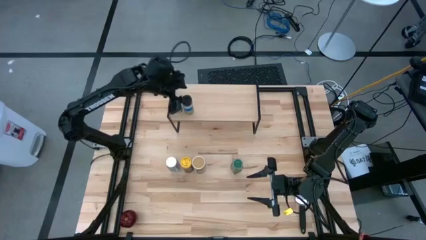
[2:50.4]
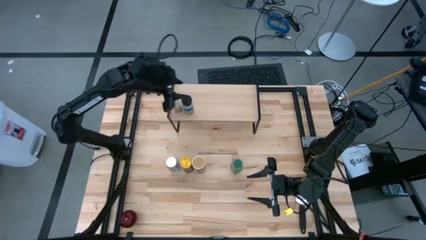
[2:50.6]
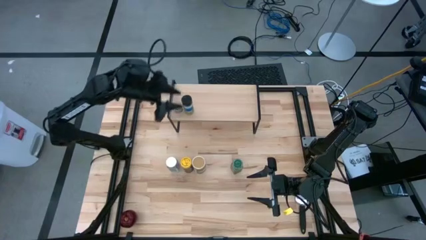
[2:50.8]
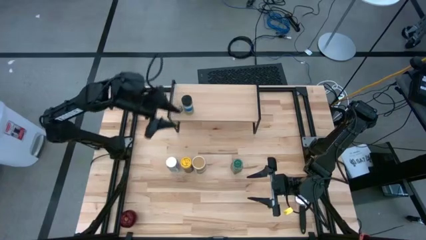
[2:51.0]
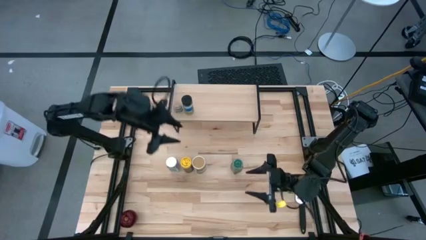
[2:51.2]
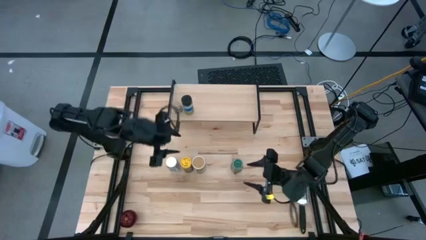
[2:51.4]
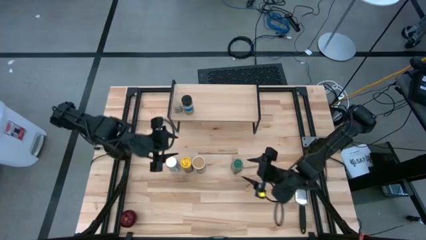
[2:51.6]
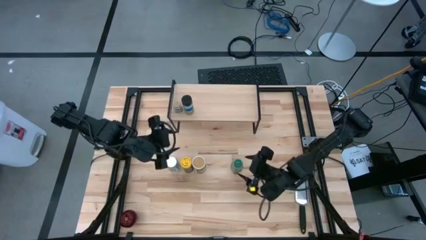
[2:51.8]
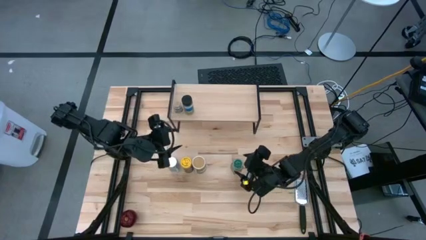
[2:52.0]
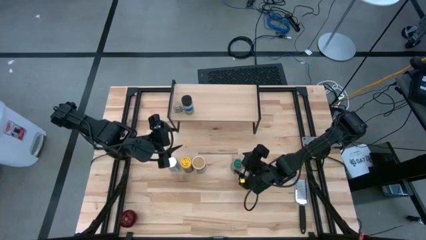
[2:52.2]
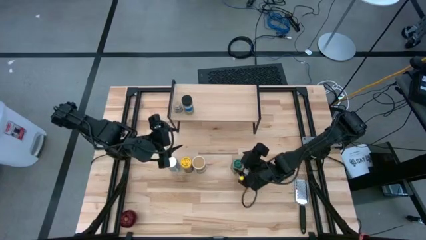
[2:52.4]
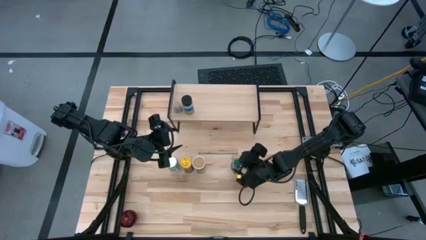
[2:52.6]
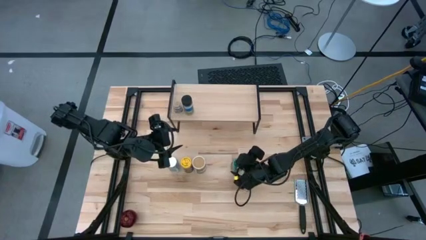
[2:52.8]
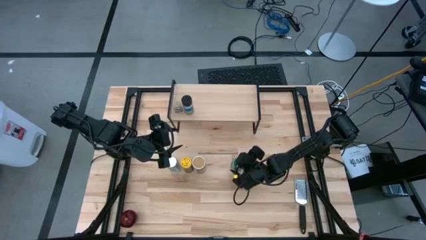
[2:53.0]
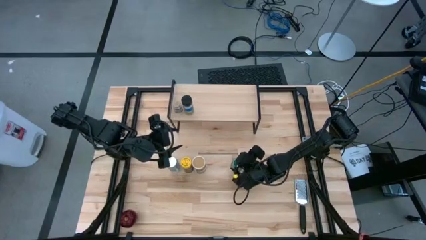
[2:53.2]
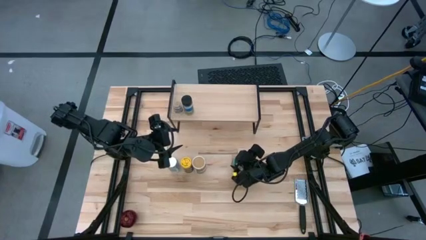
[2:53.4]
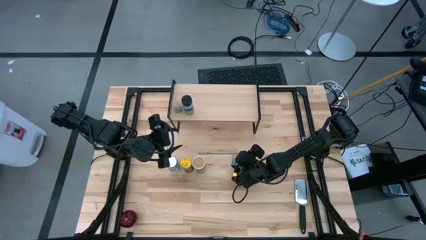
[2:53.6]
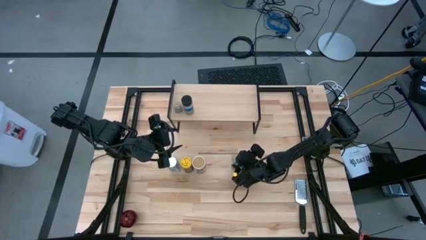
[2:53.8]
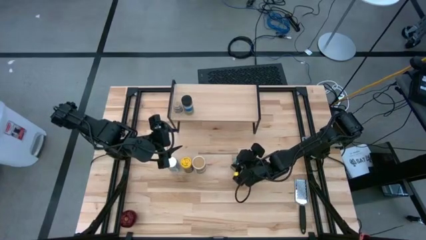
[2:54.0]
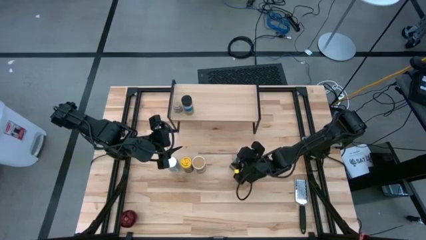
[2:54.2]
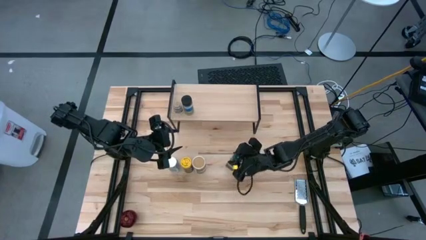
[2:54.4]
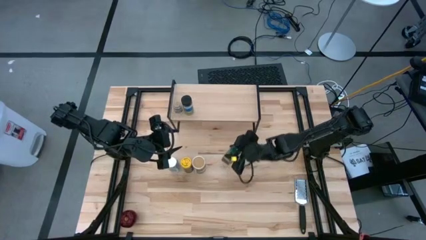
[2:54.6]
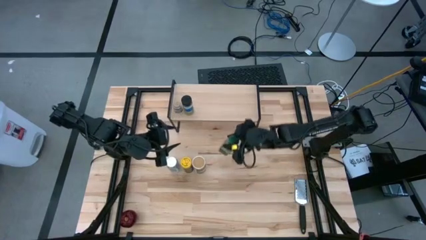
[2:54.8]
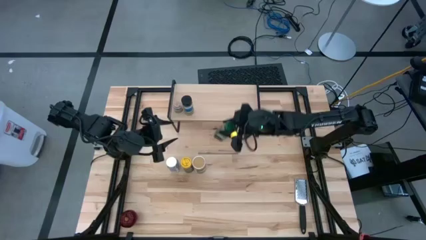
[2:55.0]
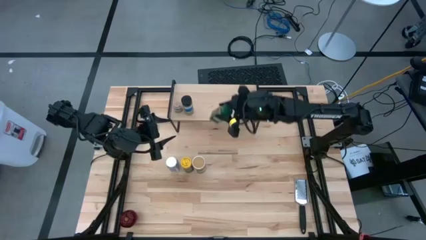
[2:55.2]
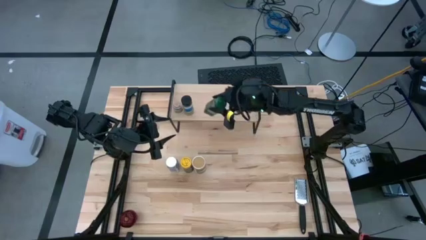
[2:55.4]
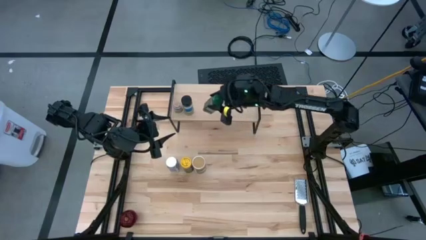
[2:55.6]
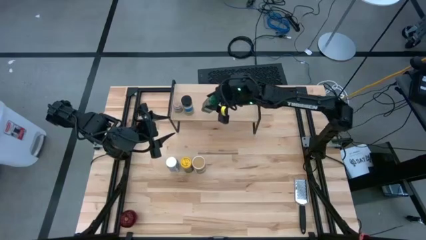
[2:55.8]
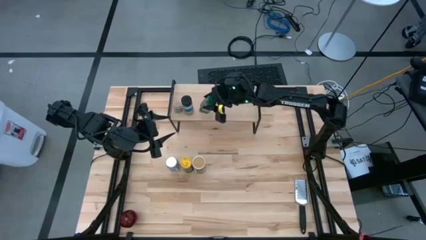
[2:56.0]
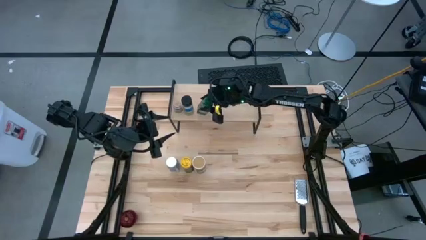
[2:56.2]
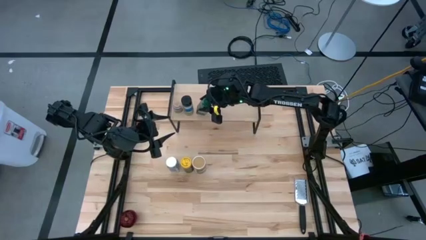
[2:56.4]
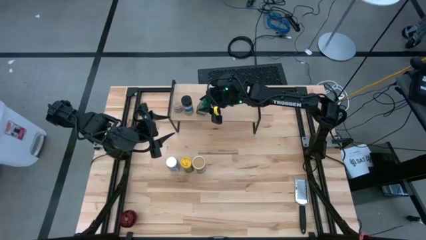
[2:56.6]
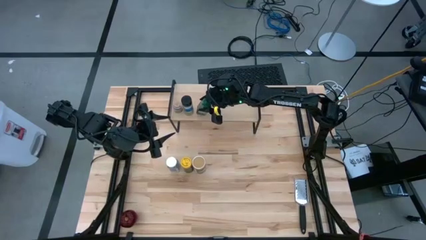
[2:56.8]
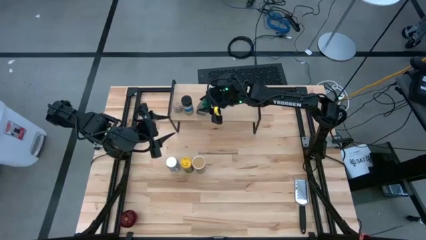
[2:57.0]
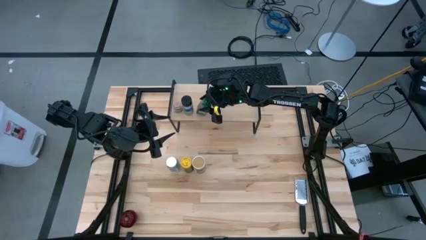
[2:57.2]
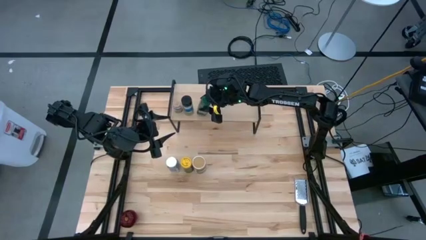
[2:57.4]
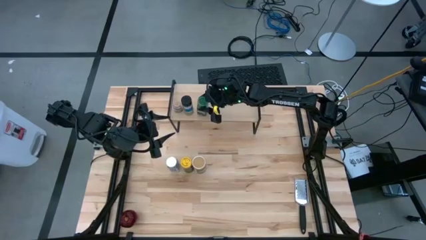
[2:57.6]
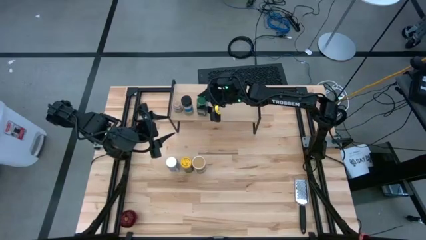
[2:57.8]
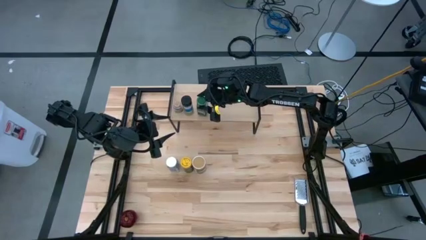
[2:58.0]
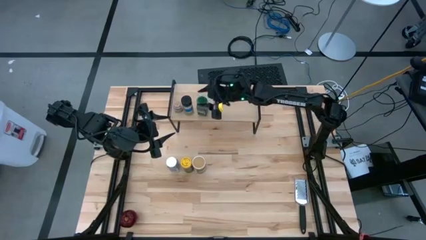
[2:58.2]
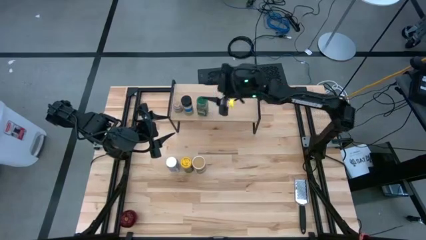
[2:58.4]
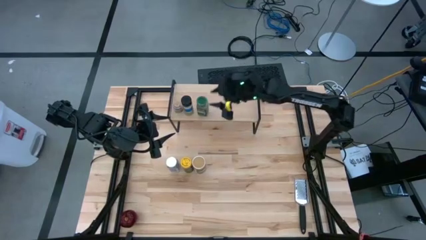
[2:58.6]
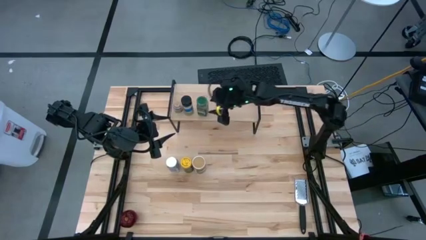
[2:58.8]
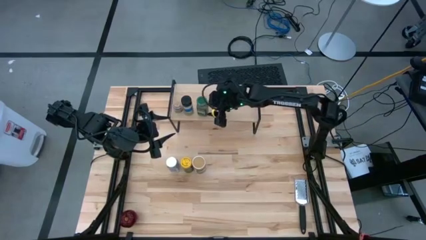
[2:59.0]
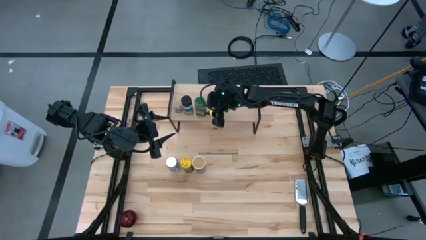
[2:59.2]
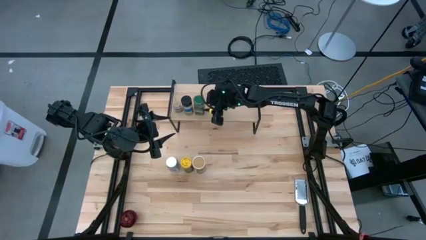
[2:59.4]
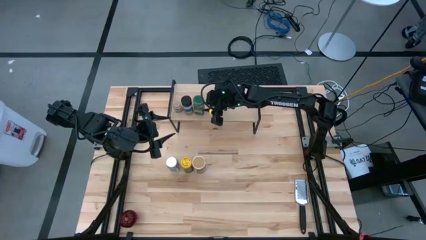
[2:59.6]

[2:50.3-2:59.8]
Task: Shelf spices
Put the green seasoning bottle on the shelf
